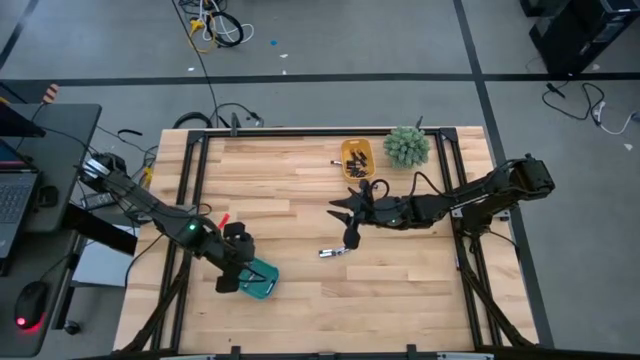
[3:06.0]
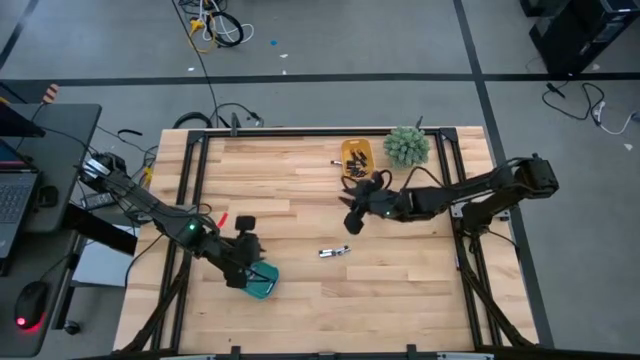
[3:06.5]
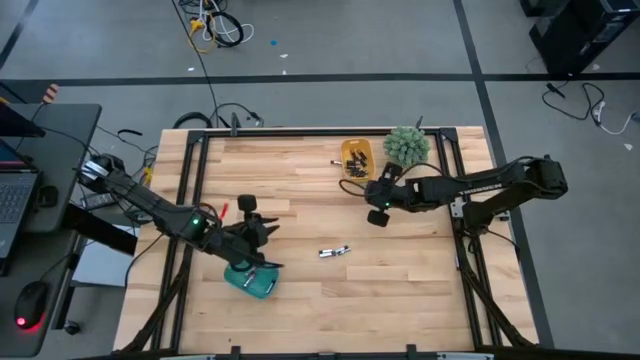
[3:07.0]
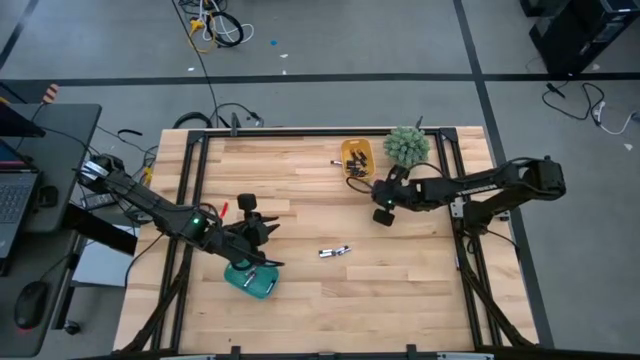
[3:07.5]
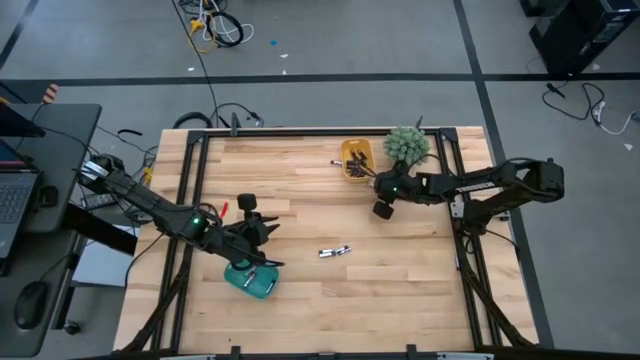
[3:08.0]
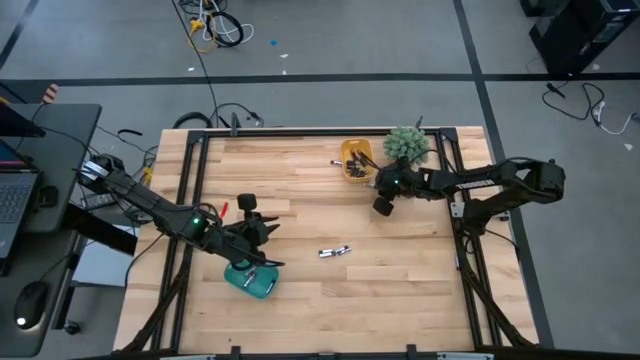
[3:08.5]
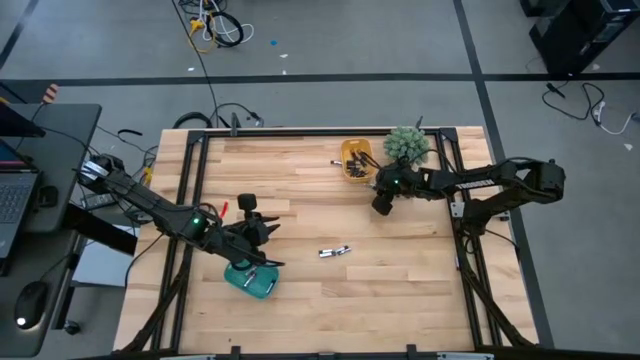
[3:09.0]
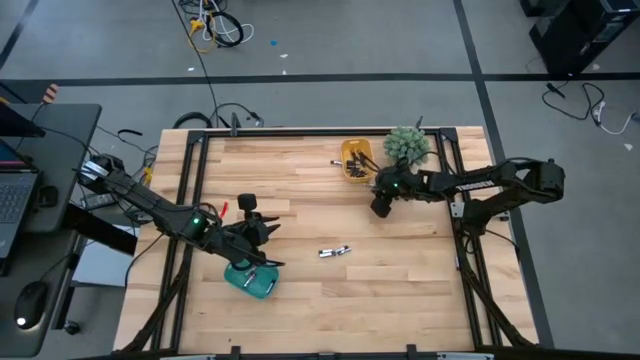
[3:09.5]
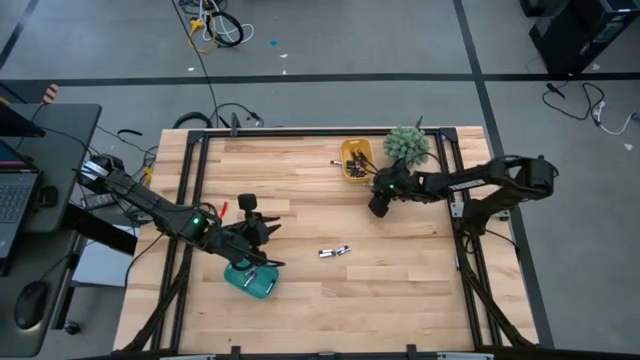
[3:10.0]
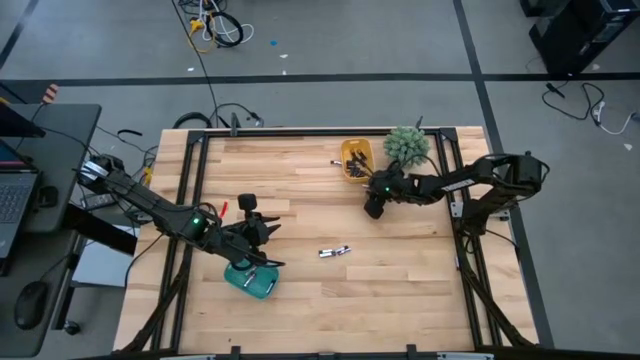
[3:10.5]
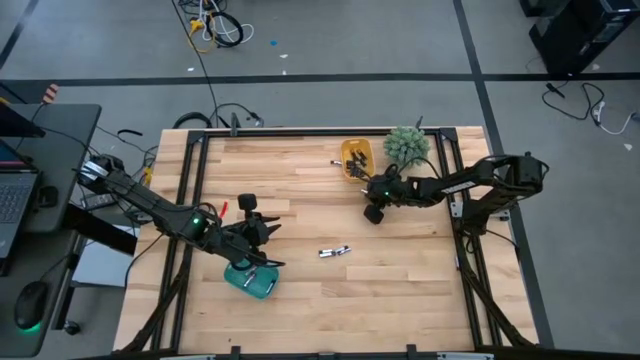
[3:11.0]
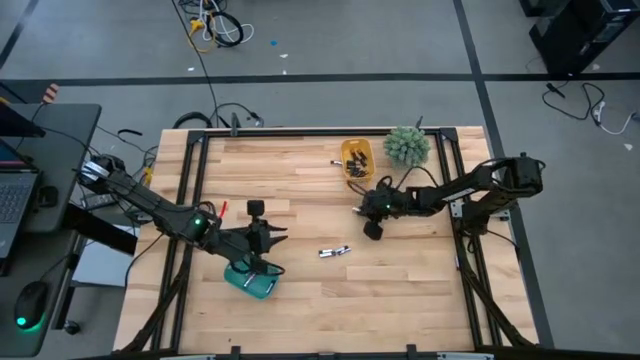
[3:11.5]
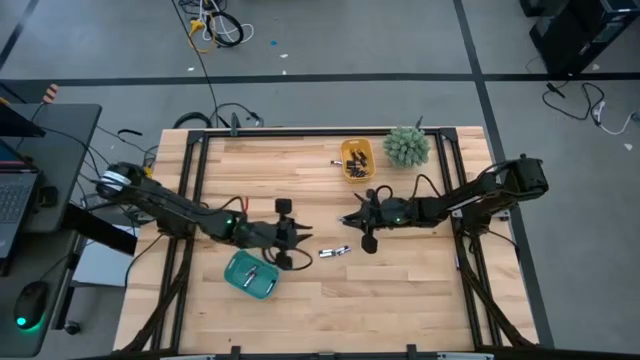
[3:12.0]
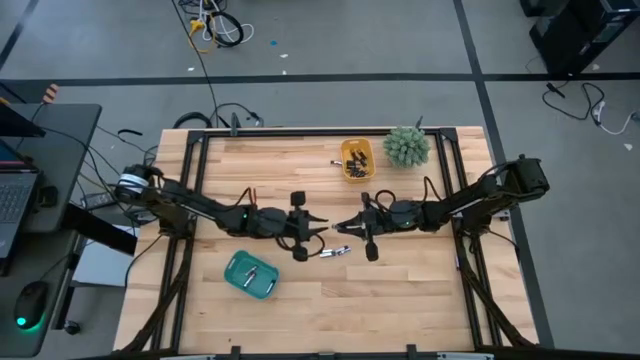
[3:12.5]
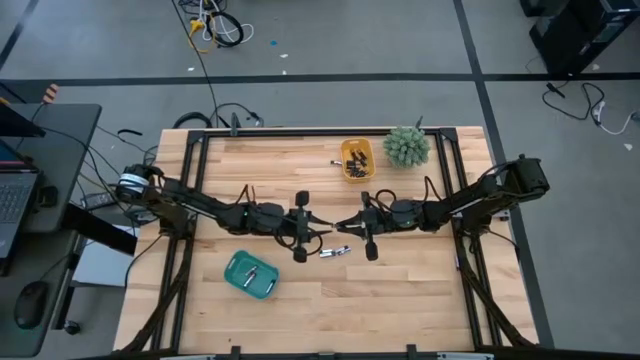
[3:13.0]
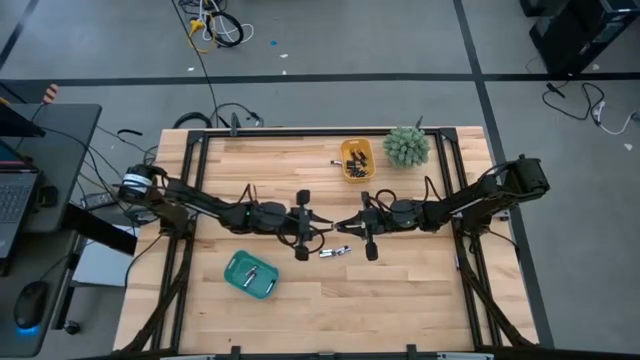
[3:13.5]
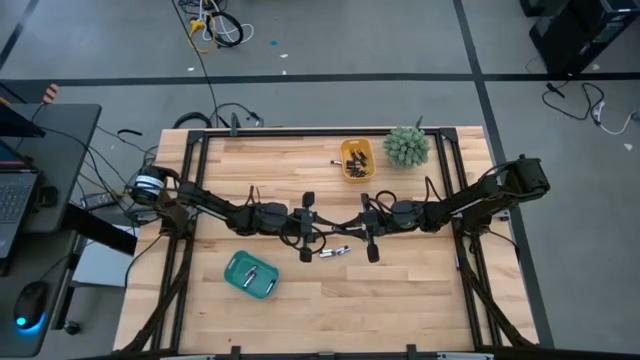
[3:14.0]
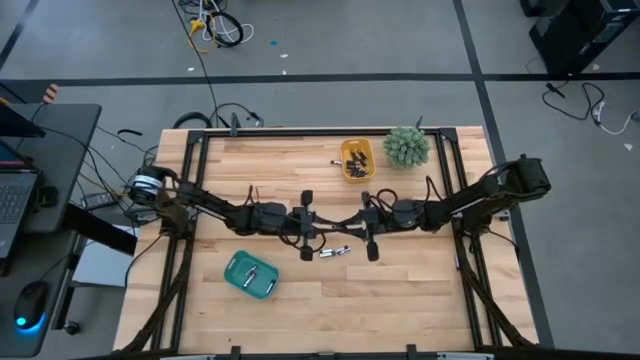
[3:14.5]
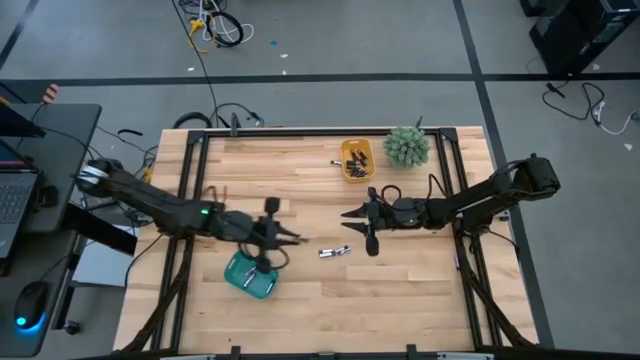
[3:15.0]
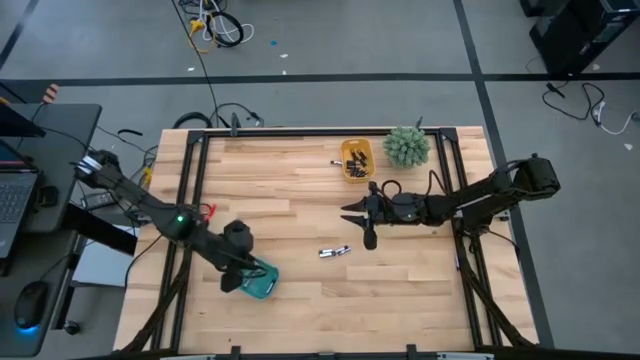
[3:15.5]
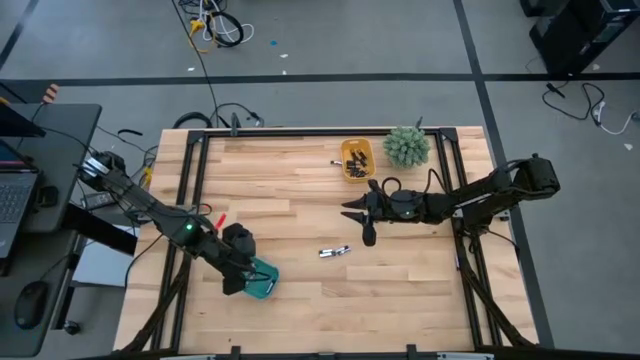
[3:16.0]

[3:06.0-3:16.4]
Task: Sort batteries
Put the silver battery into the green bin

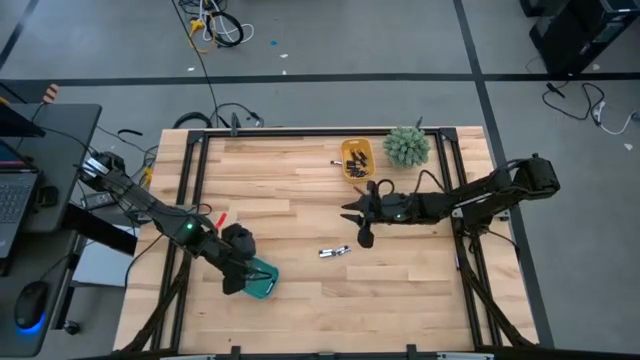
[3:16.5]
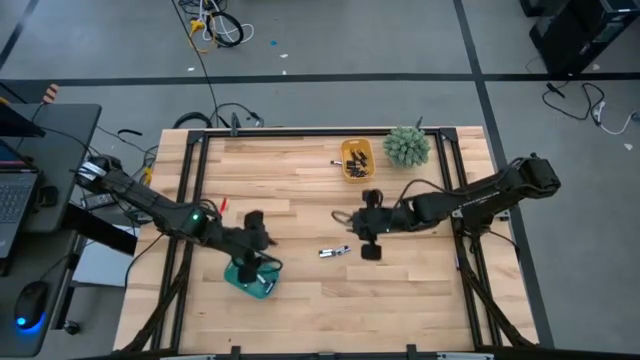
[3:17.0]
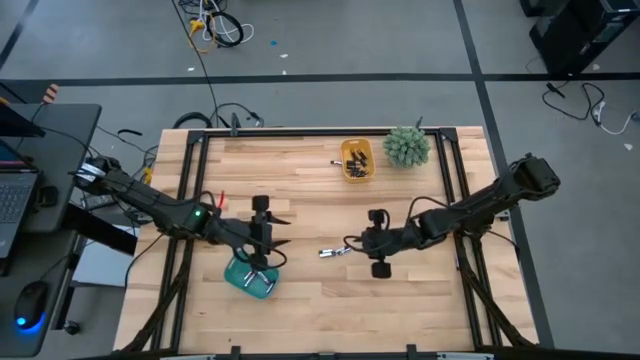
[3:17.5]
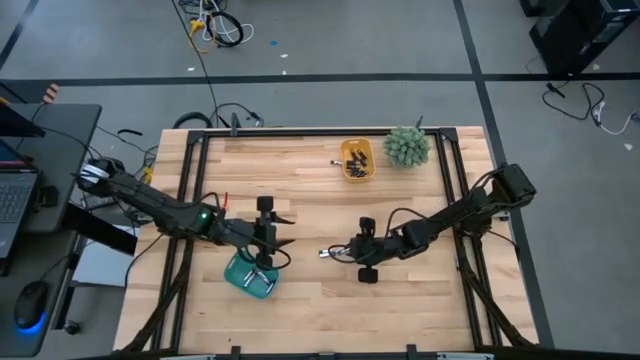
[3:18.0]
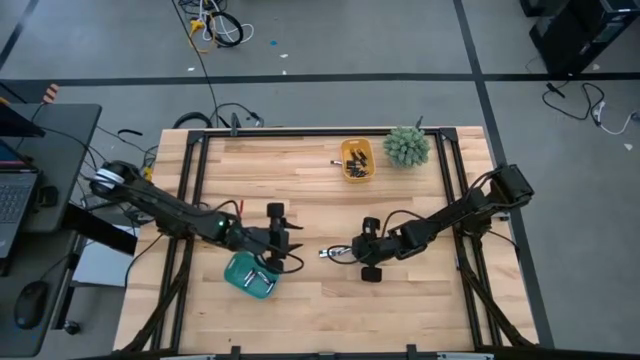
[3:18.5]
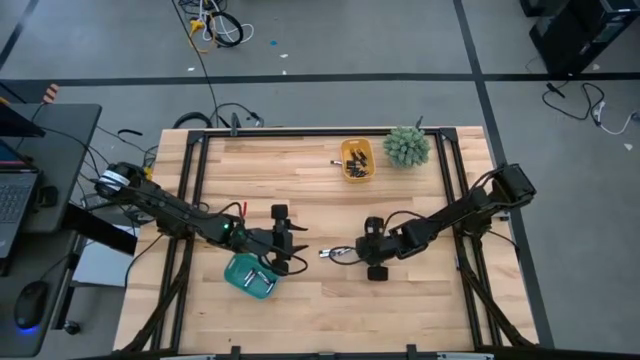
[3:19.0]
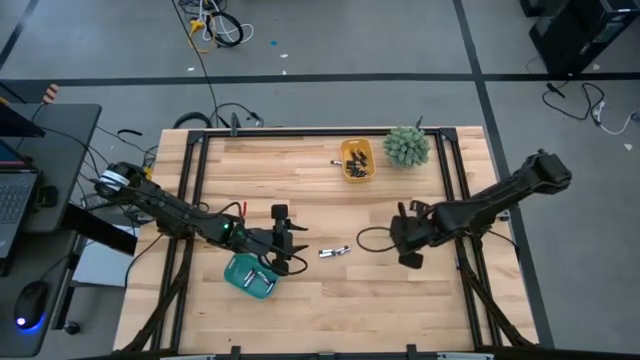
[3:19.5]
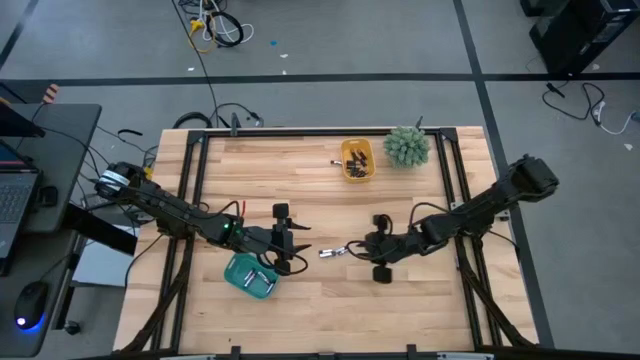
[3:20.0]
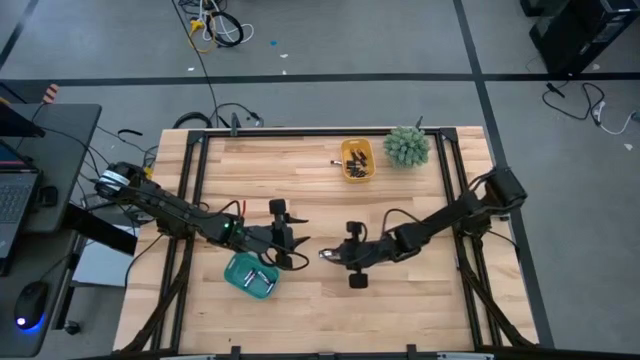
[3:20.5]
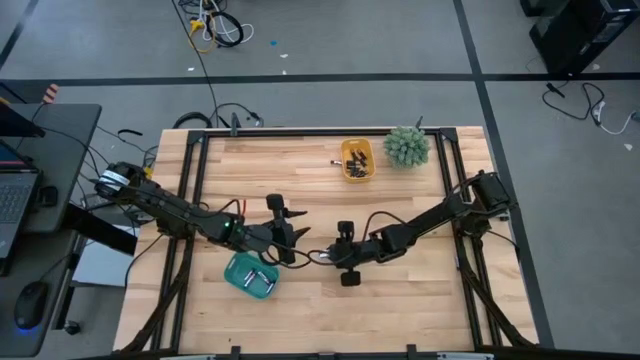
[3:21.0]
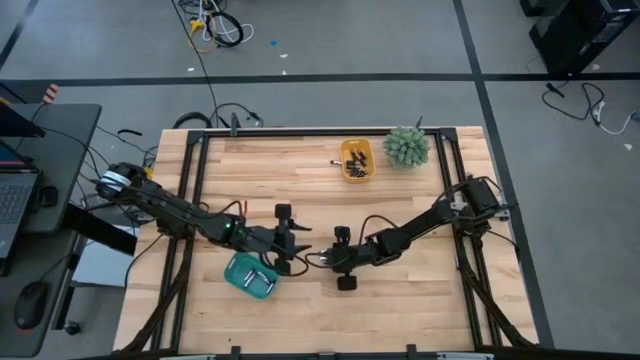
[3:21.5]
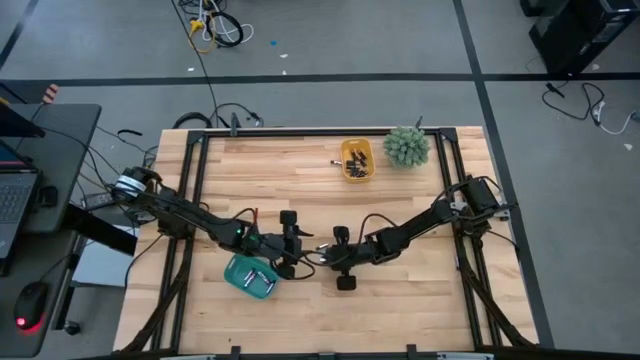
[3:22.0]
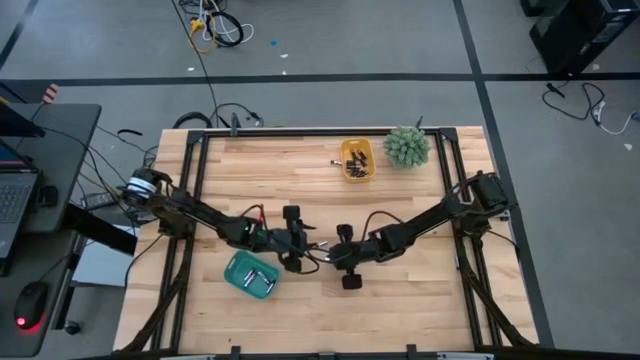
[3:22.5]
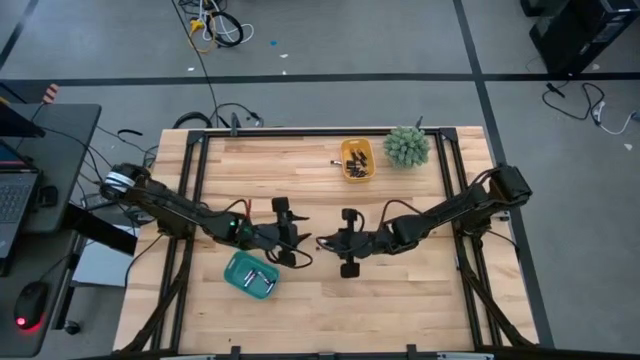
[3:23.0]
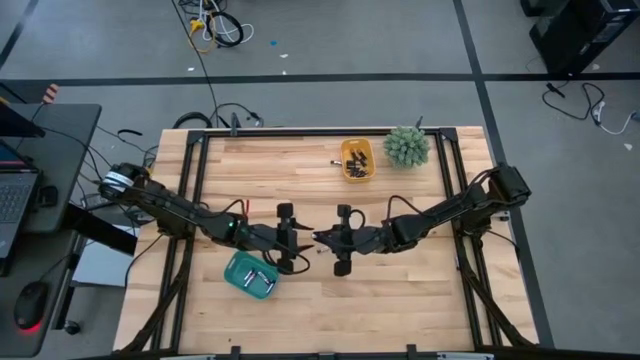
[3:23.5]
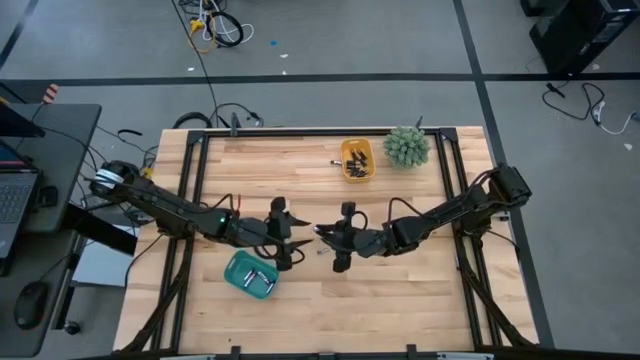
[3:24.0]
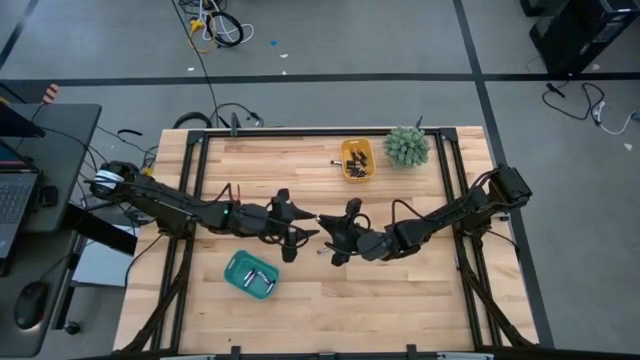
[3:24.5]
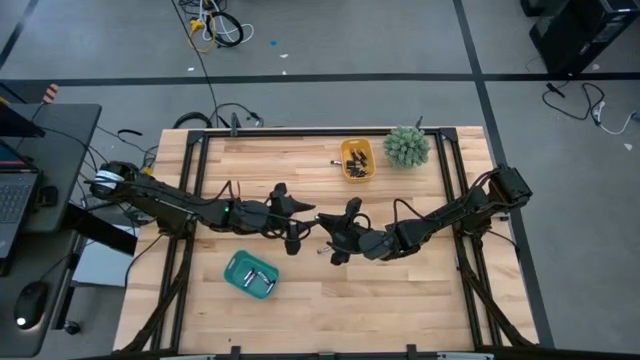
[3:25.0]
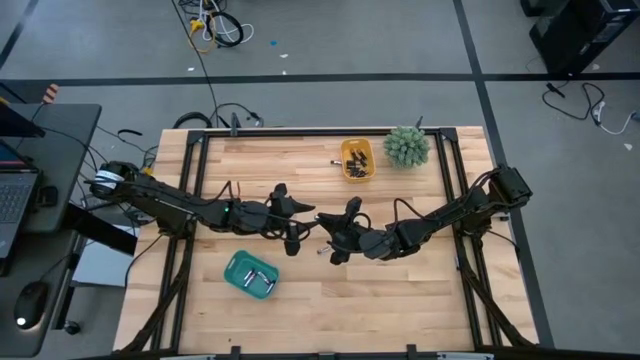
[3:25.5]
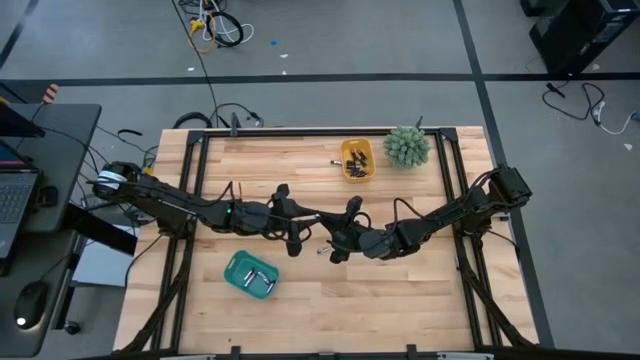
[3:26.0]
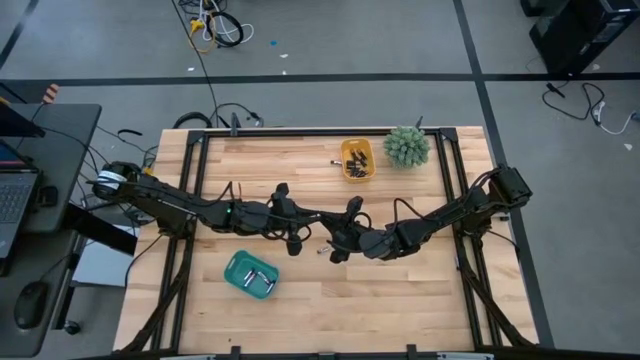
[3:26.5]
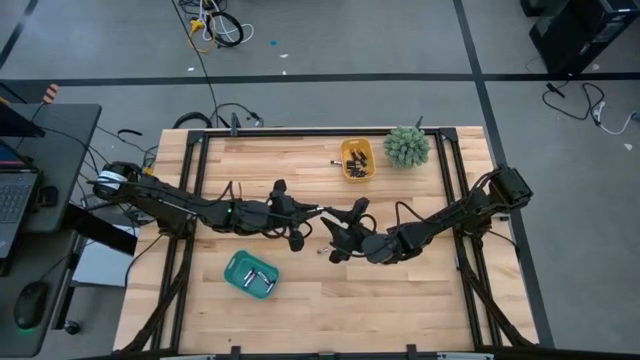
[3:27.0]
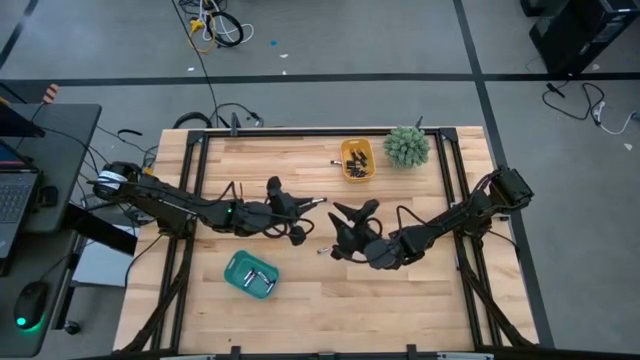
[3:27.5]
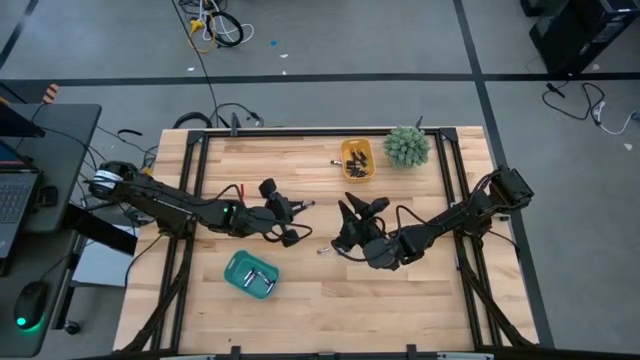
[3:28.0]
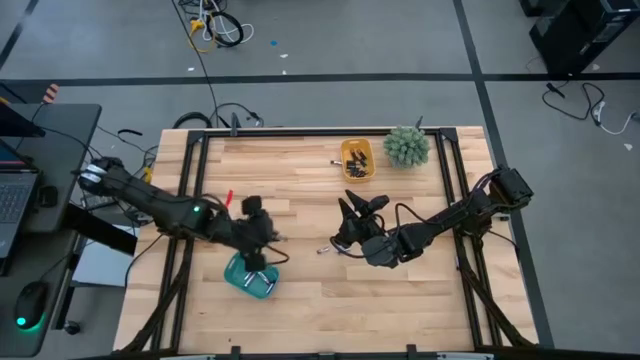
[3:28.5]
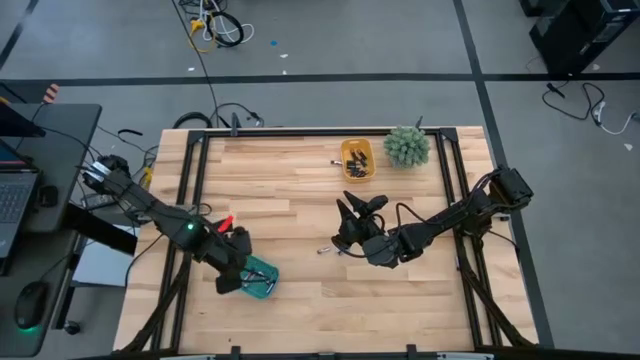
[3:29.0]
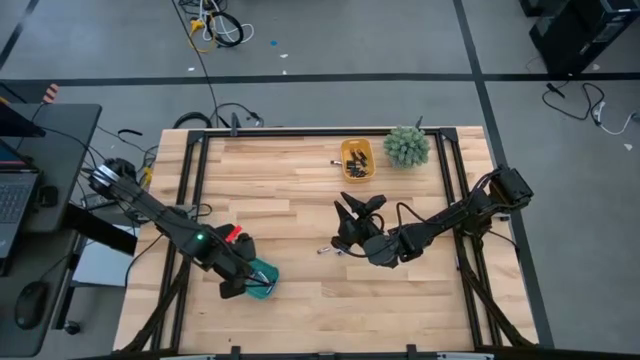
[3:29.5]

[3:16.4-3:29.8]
Put the silver battery into the green bin
